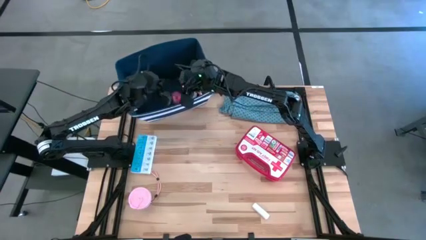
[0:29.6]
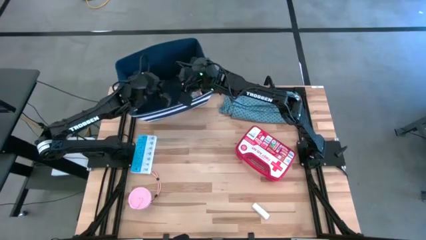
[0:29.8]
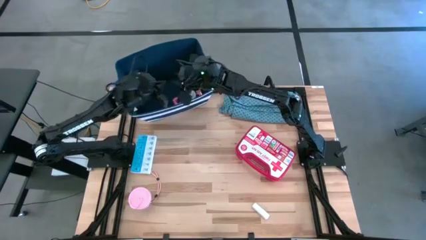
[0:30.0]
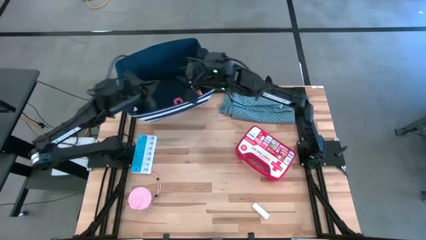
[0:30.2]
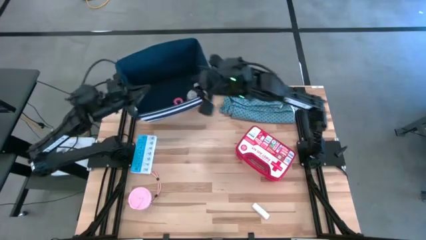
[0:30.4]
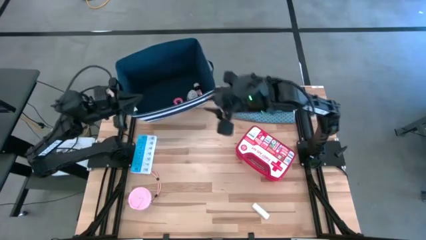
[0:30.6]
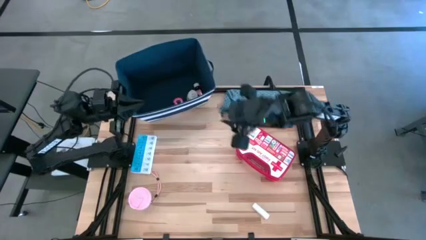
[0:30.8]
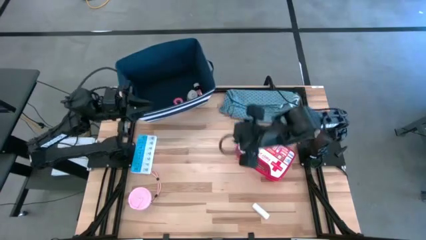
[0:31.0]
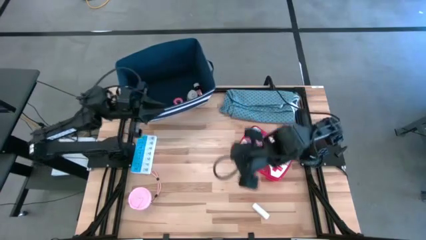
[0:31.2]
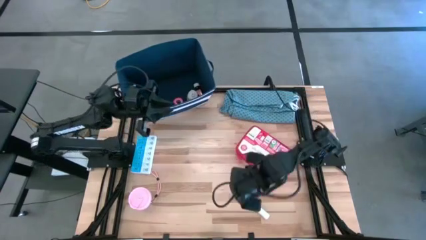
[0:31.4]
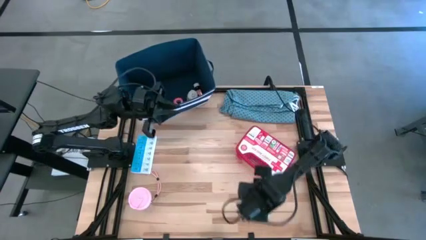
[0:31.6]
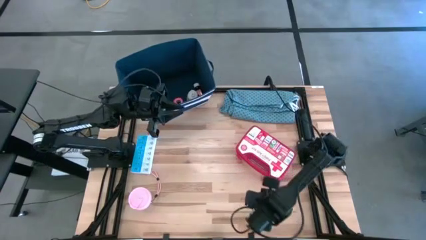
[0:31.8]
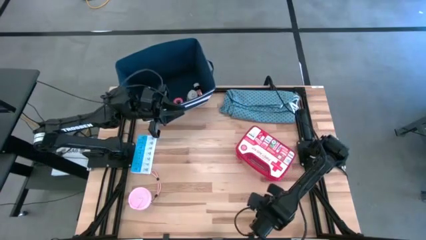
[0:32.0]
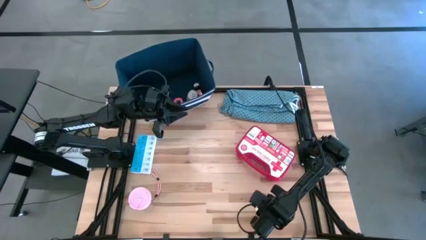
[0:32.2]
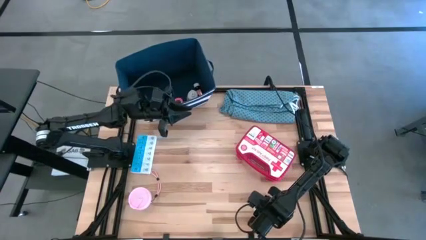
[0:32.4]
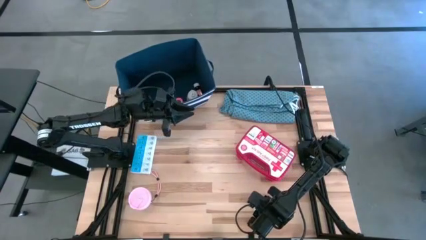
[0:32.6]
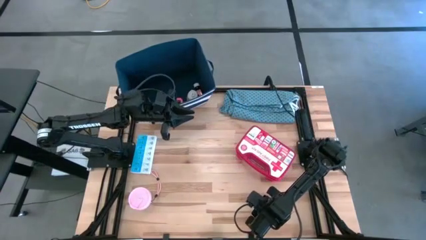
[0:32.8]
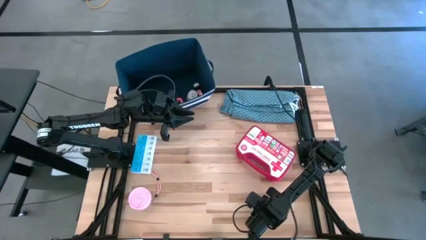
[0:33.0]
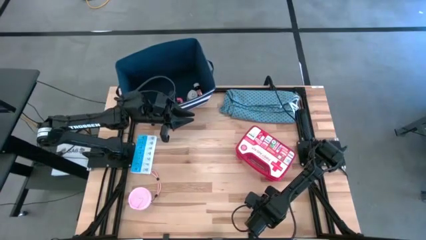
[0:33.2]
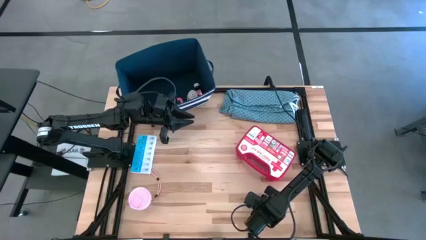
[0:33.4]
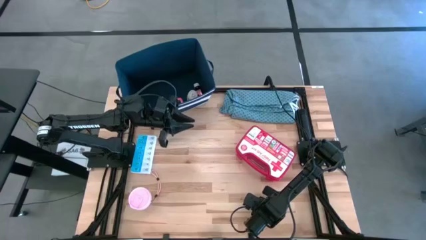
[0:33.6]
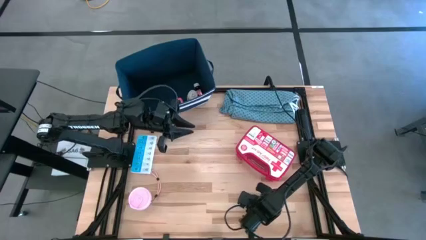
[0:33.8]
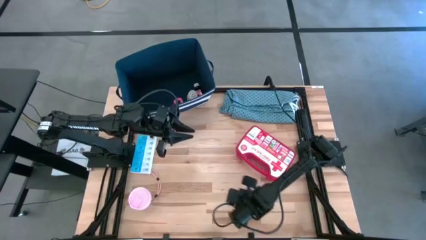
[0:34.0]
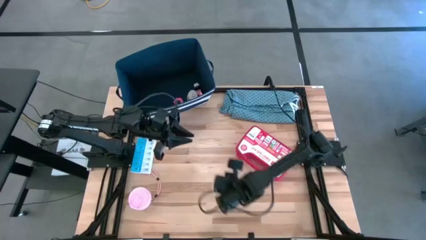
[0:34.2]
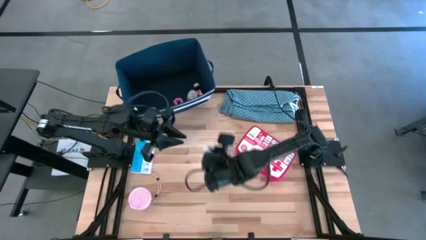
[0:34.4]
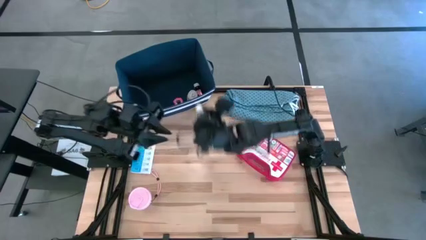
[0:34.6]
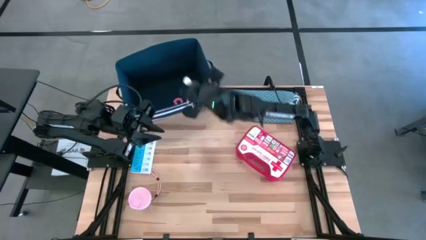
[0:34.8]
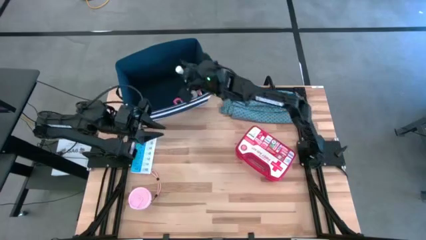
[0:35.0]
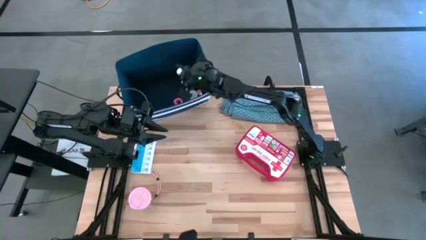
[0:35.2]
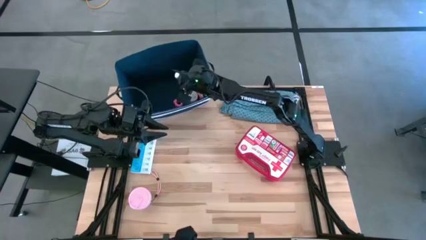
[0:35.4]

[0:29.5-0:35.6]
Task: Pick & place medical supplies in basket/bin
Put the white rolled gauze into the blue bin

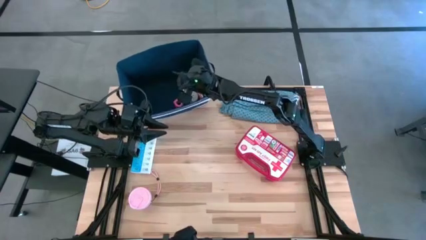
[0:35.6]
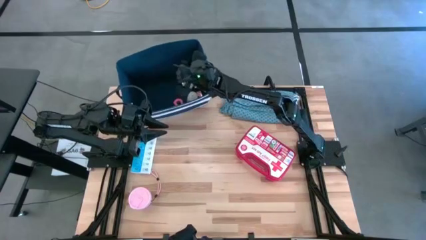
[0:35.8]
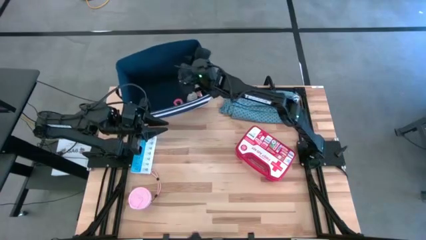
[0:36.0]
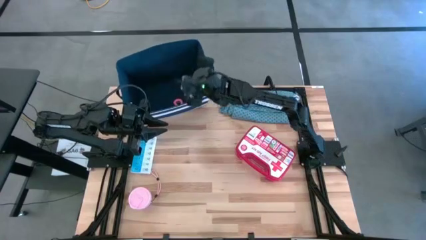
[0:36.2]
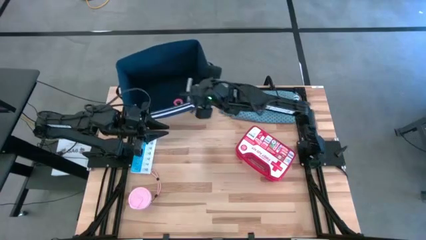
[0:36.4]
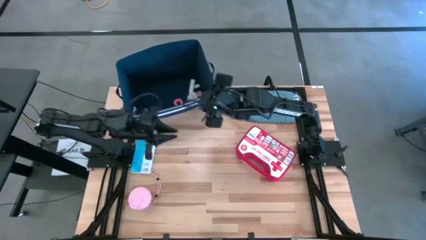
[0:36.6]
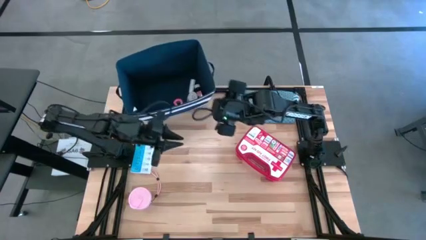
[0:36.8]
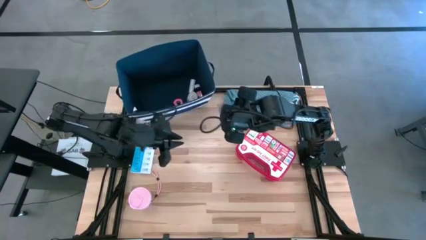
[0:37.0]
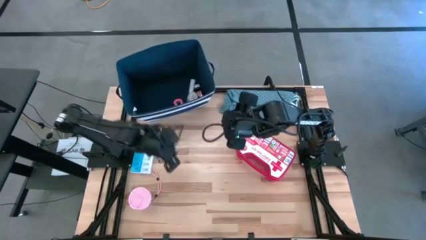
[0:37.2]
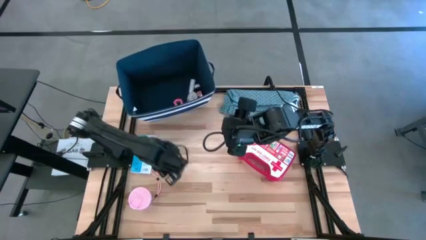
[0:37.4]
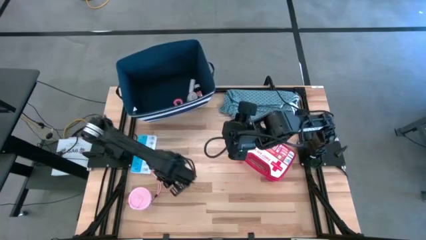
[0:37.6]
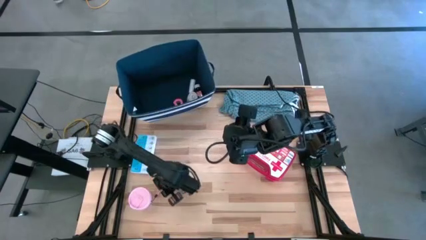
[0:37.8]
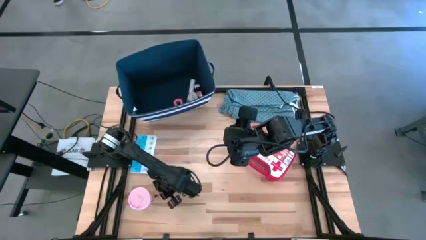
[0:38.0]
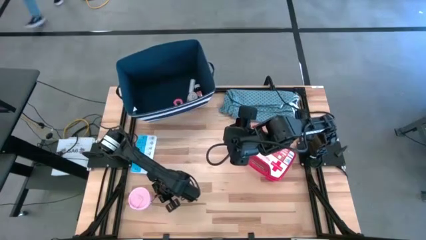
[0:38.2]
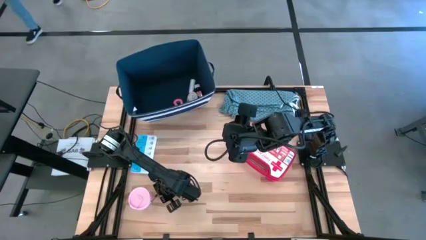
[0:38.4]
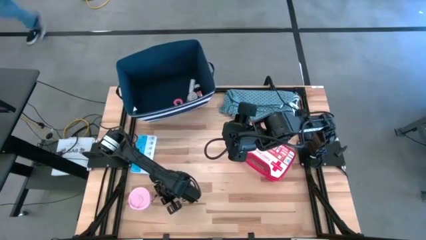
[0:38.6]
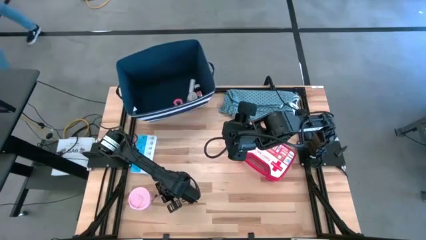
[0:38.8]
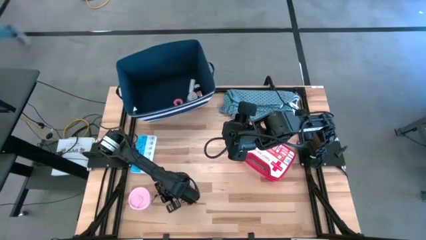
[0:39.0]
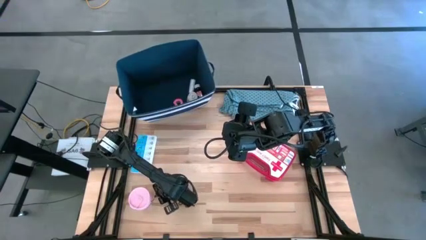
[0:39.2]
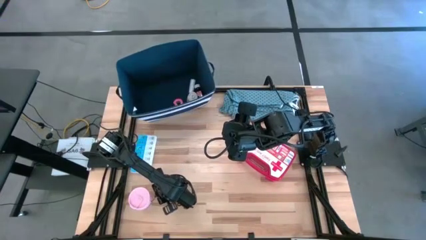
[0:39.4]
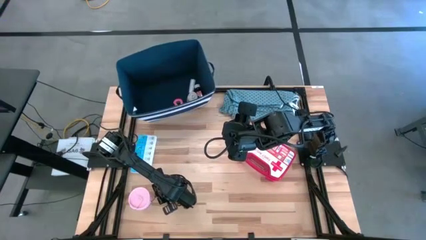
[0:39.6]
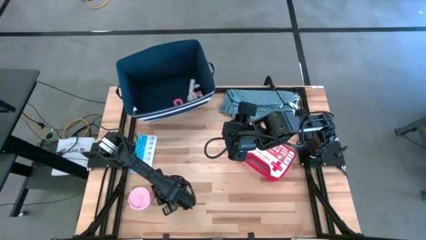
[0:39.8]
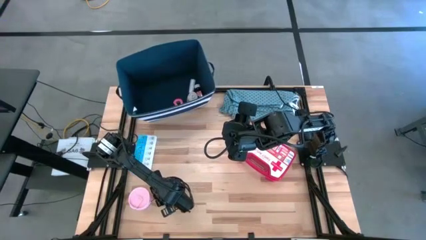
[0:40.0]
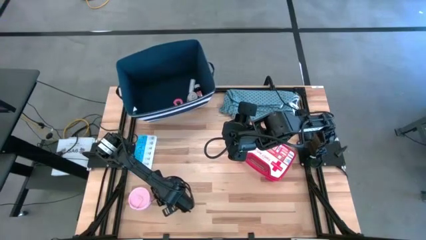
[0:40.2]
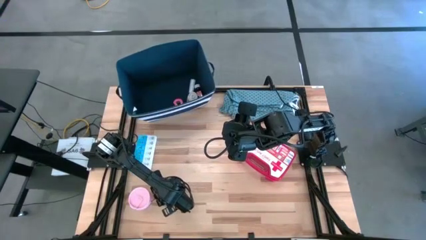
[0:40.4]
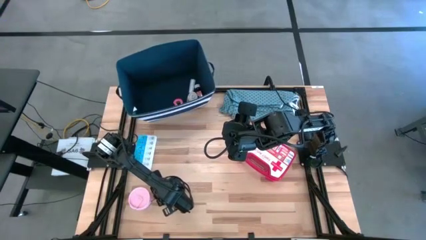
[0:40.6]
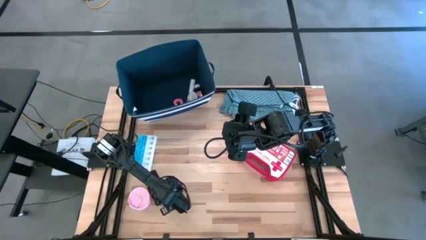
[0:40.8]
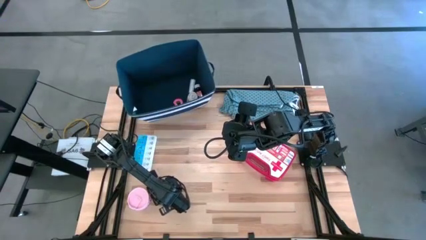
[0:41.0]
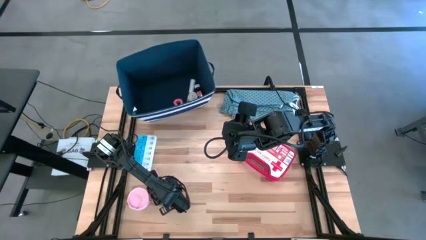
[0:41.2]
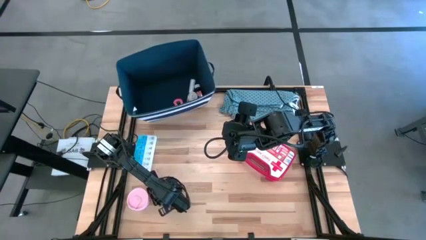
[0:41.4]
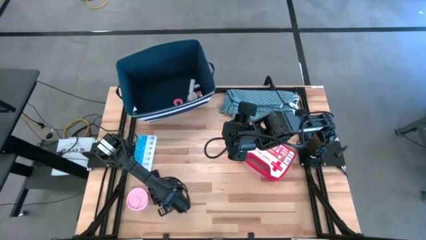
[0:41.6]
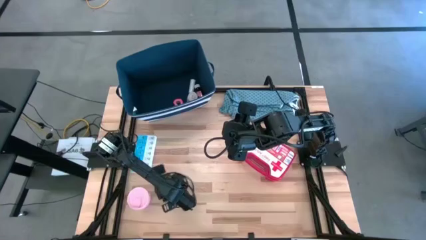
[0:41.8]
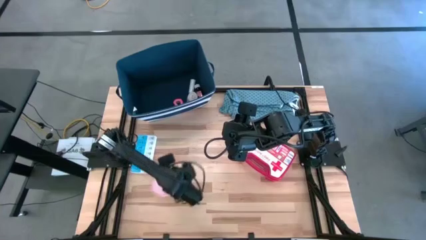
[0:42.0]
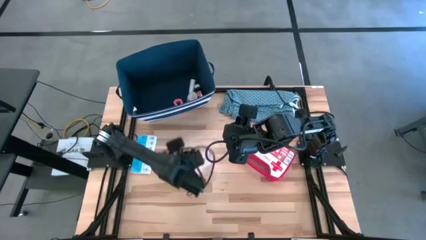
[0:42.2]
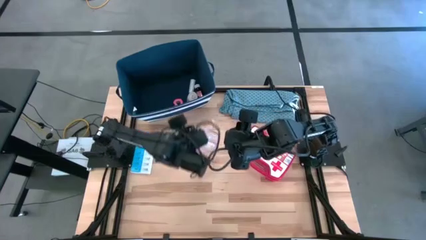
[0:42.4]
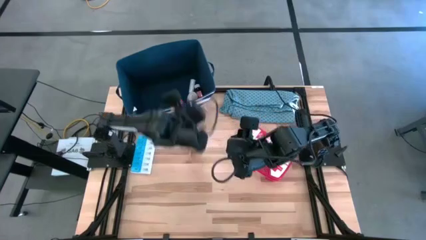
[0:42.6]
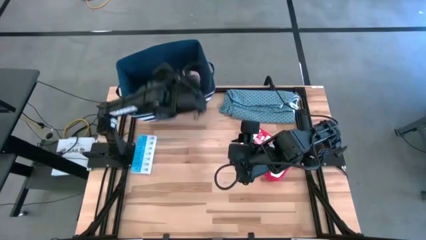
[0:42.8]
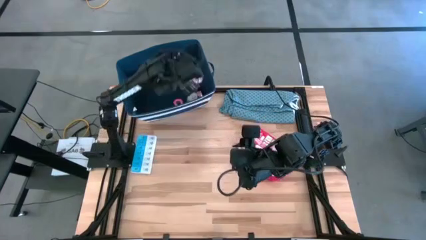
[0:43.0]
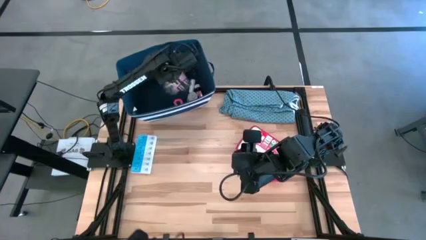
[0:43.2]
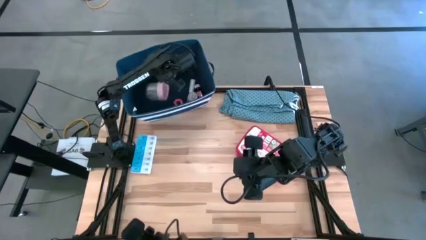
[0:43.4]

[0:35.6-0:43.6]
Put the transparent tumbler into the blue bin

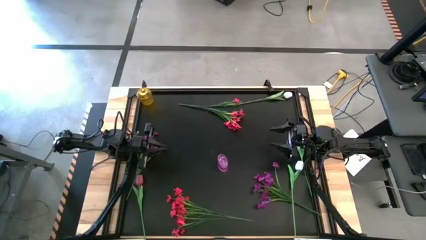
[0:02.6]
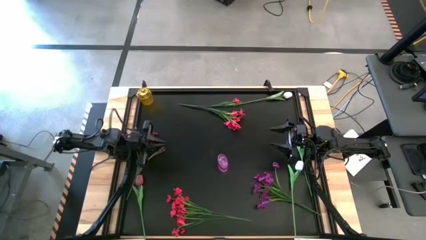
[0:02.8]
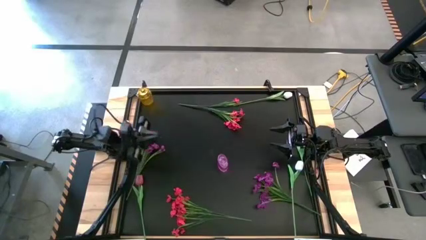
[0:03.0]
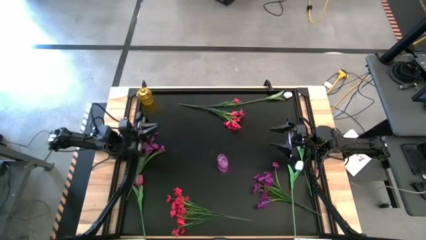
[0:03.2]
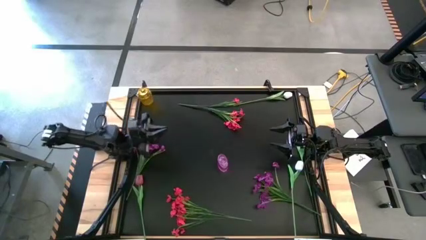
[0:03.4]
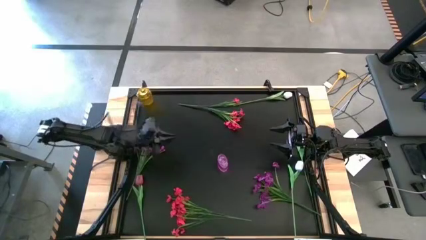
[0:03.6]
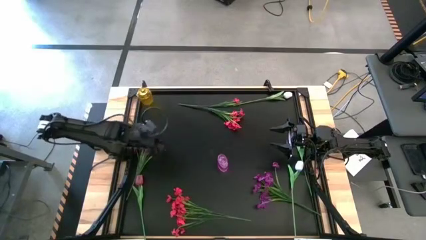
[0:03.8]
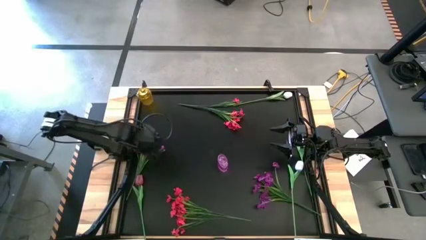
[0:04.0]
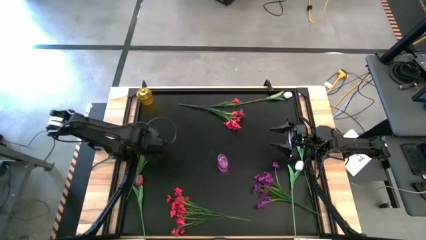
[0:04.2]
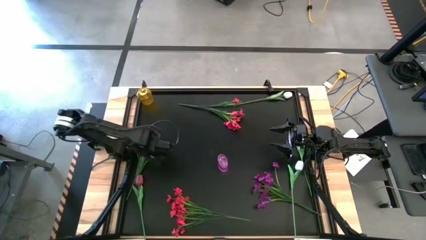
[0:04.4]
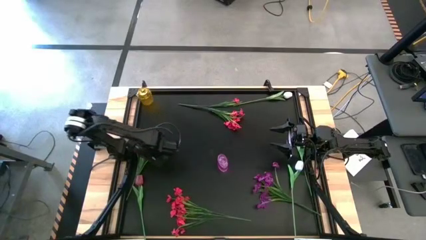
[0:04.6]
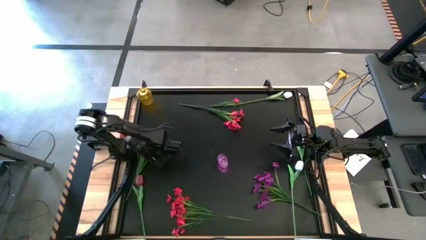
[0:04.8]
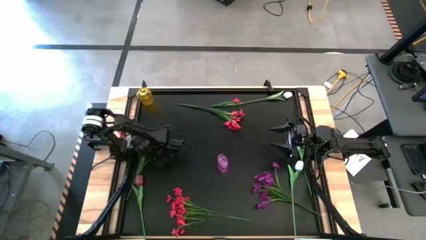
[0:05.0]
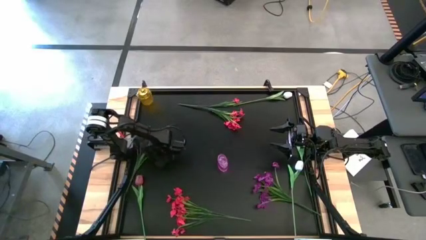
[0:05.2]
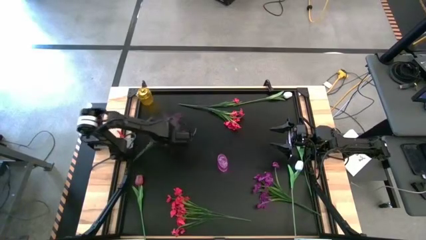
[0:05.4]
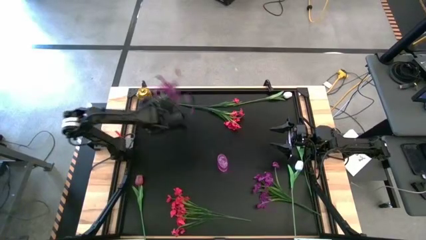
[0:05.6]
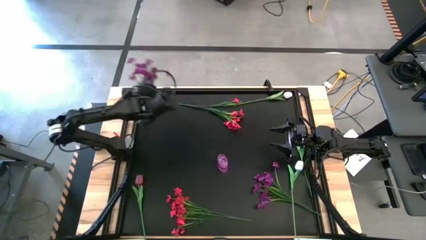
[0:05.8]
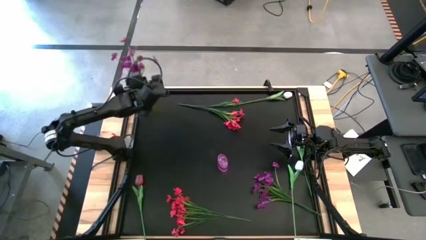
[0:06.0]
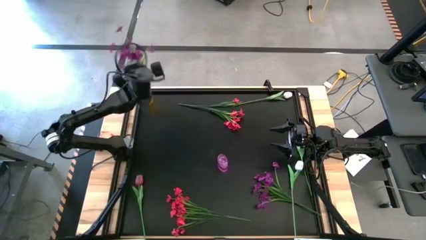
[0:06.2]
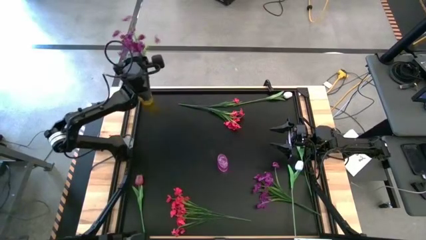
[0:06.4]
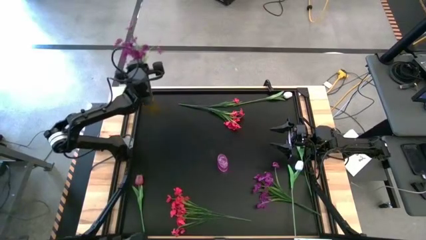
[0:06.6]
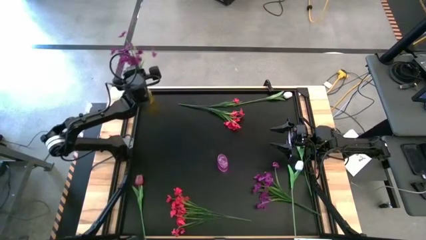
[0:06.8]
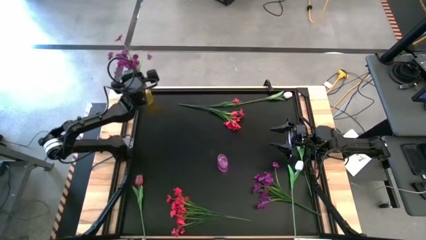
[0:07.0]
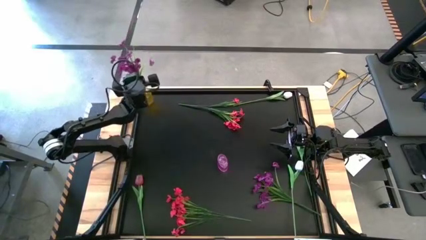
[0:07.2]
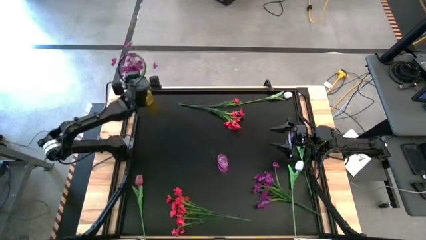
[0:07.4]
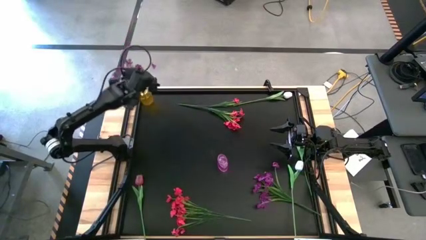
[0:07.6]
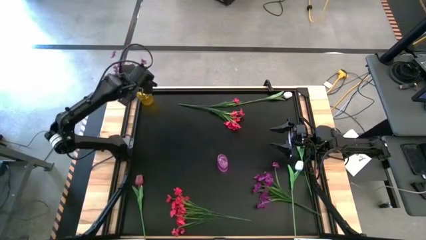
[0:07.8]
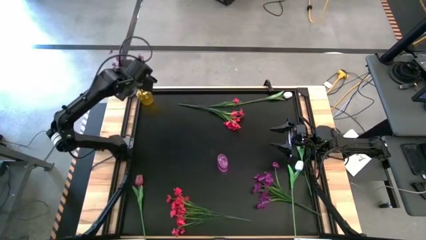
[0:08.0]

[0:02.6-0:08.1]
Task: Sort flowers into vase by color
Put the left violet flower into the yellow vase
